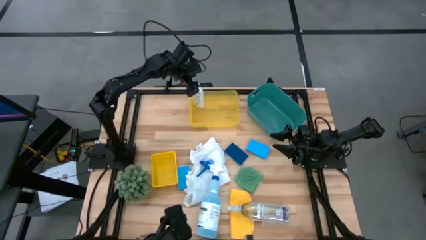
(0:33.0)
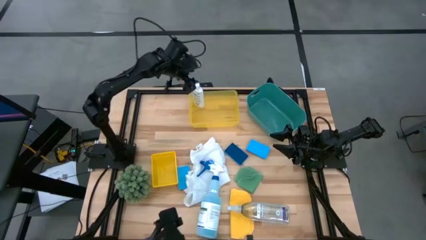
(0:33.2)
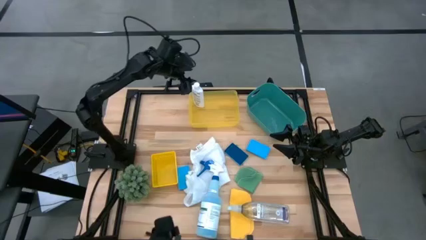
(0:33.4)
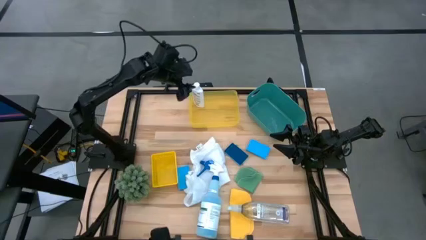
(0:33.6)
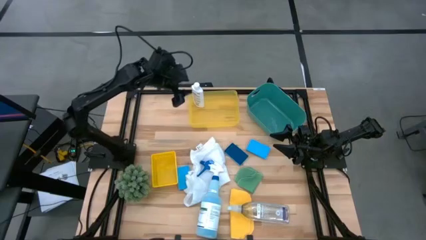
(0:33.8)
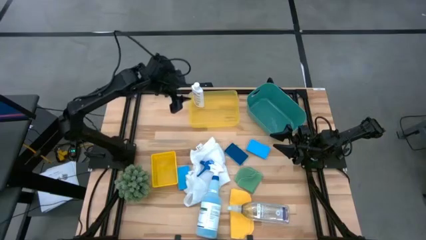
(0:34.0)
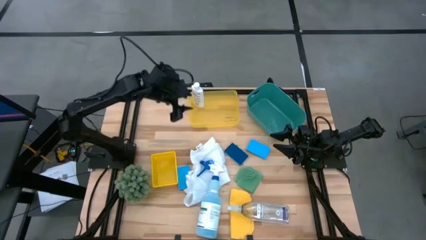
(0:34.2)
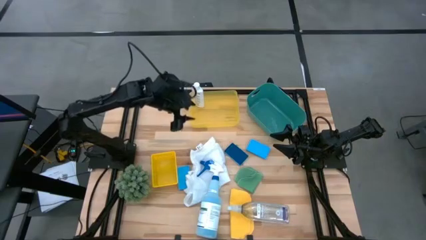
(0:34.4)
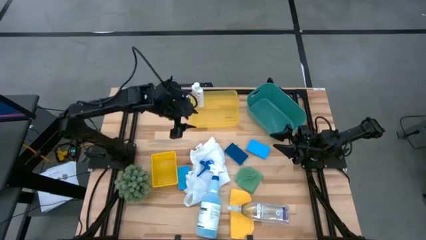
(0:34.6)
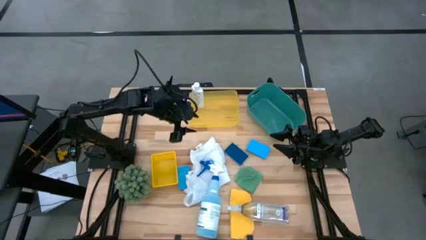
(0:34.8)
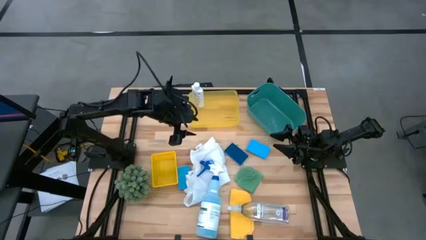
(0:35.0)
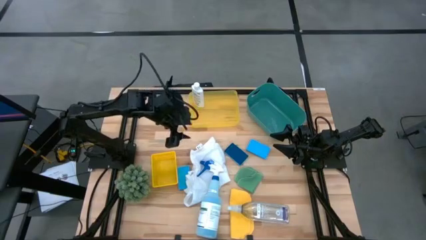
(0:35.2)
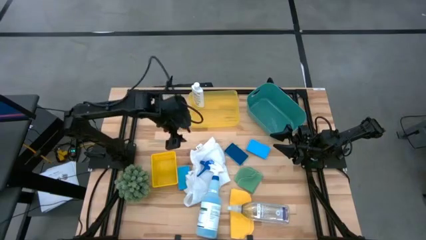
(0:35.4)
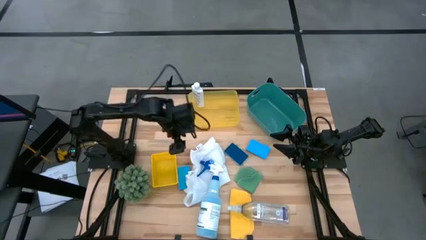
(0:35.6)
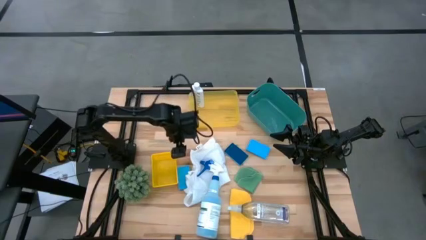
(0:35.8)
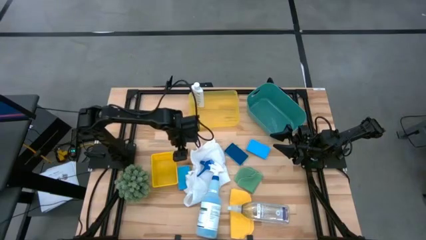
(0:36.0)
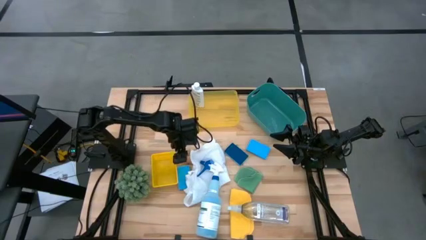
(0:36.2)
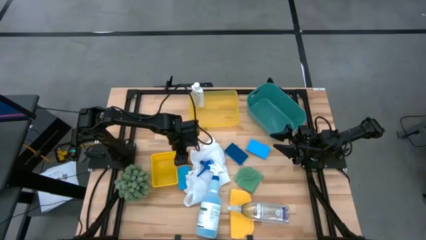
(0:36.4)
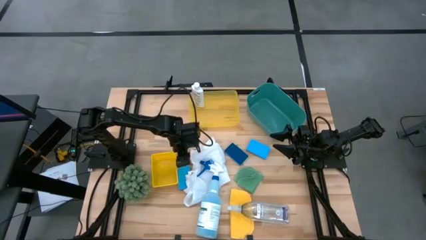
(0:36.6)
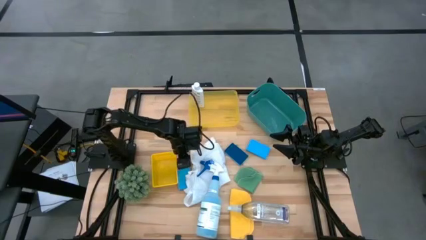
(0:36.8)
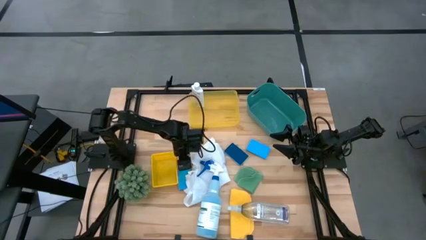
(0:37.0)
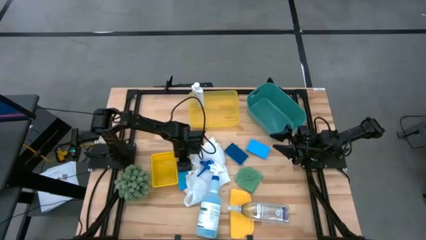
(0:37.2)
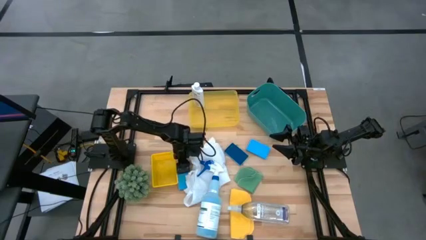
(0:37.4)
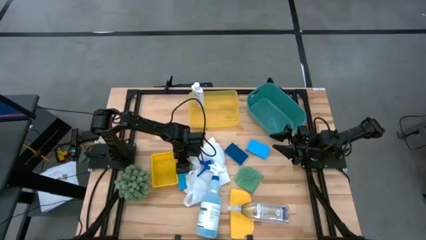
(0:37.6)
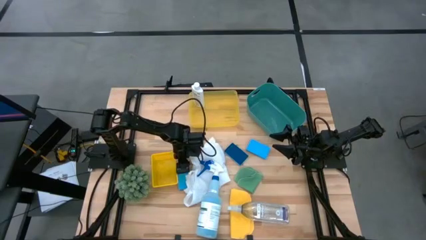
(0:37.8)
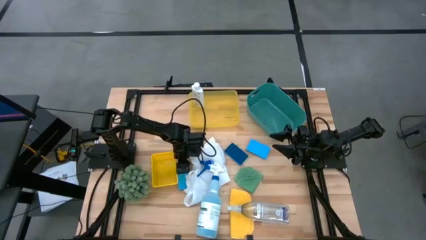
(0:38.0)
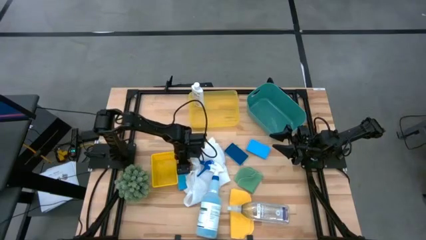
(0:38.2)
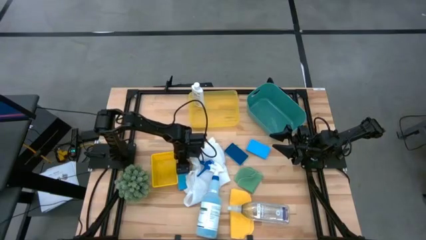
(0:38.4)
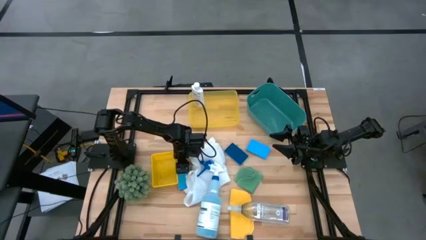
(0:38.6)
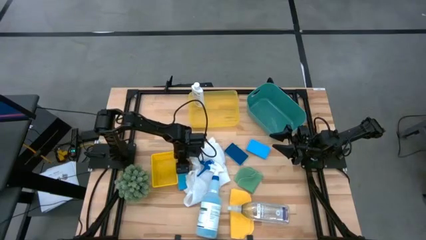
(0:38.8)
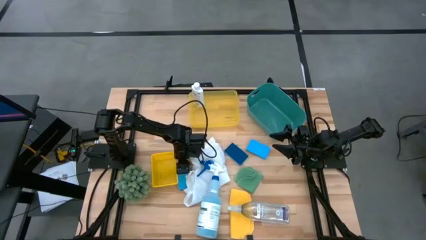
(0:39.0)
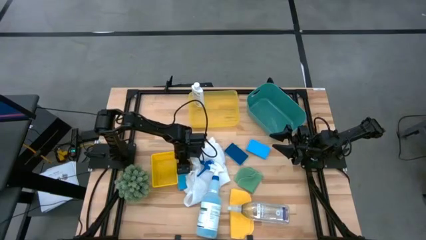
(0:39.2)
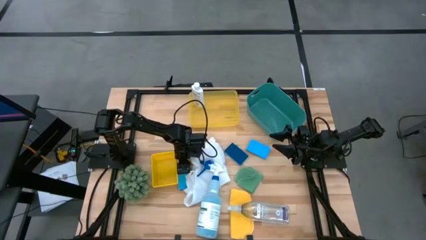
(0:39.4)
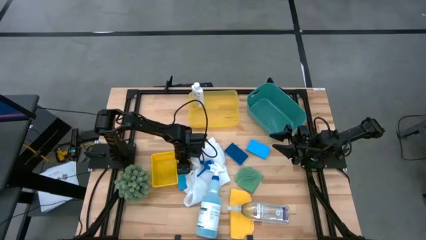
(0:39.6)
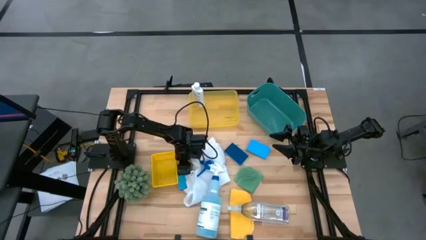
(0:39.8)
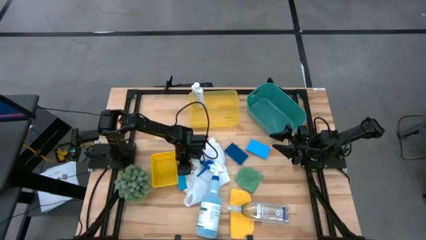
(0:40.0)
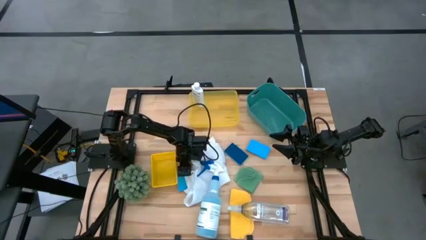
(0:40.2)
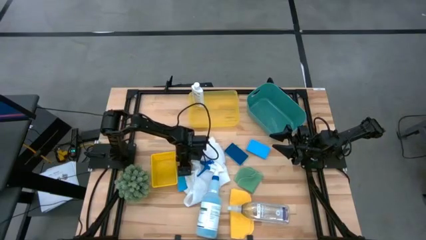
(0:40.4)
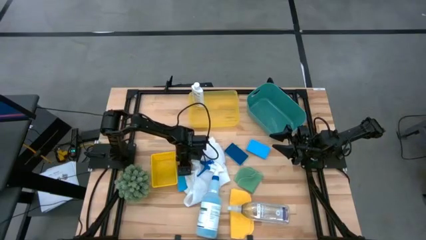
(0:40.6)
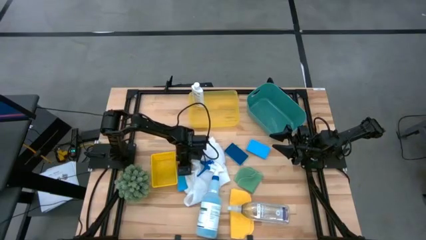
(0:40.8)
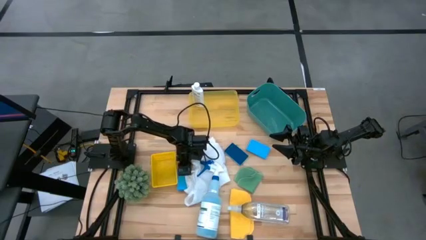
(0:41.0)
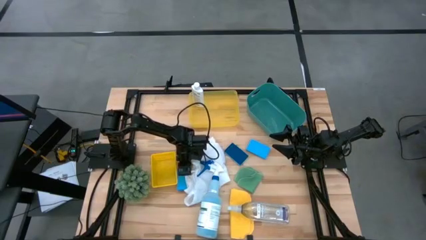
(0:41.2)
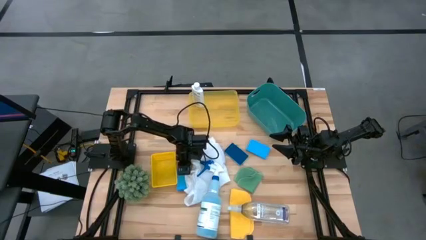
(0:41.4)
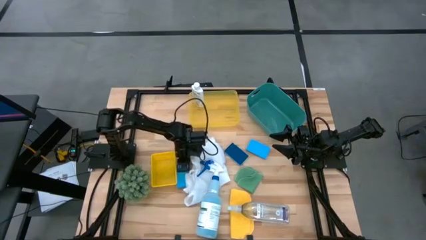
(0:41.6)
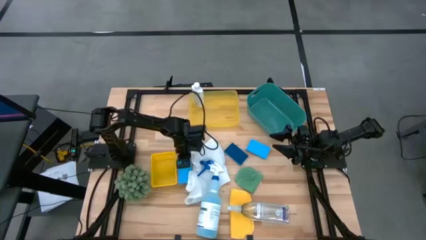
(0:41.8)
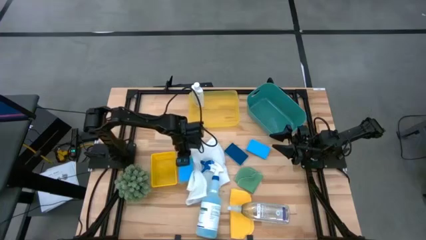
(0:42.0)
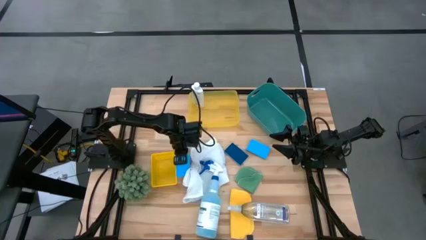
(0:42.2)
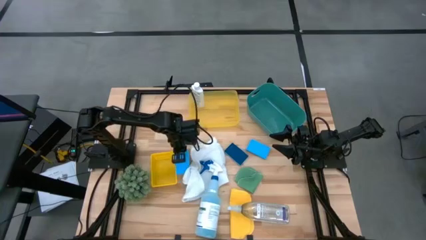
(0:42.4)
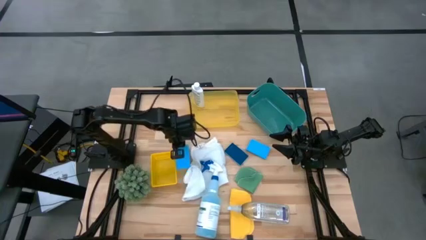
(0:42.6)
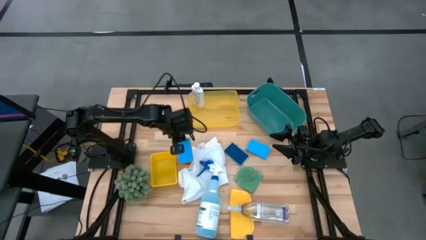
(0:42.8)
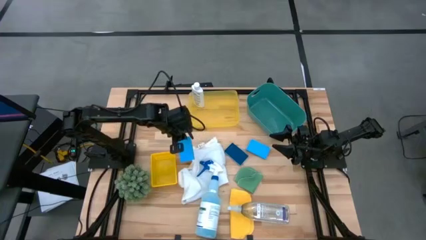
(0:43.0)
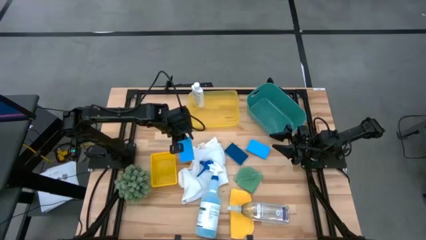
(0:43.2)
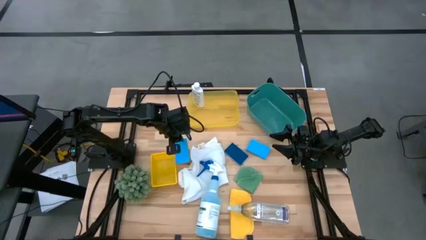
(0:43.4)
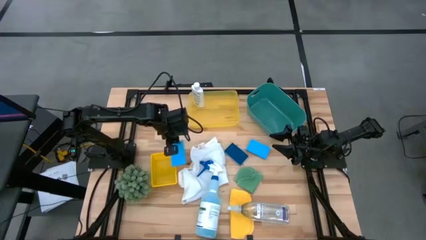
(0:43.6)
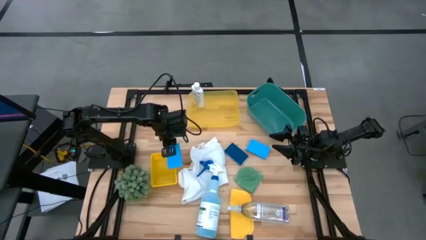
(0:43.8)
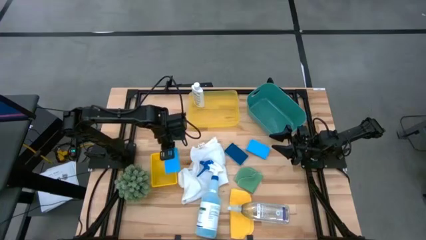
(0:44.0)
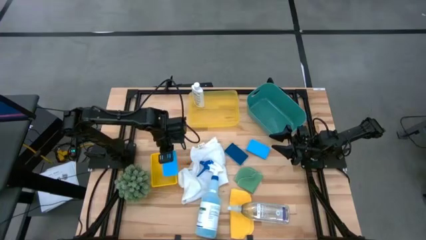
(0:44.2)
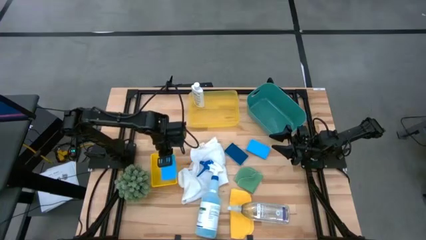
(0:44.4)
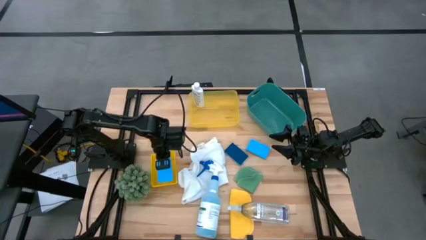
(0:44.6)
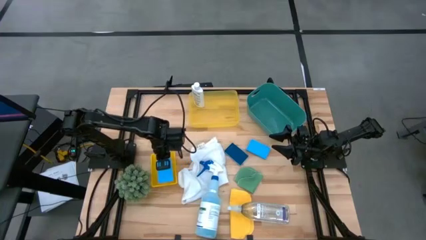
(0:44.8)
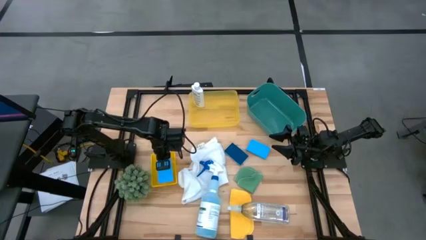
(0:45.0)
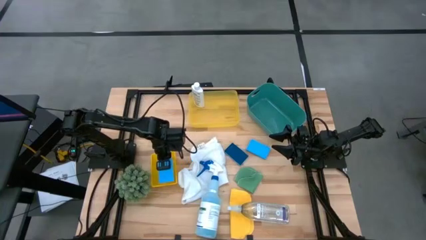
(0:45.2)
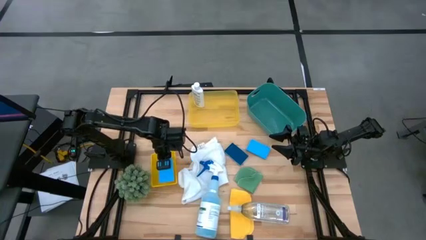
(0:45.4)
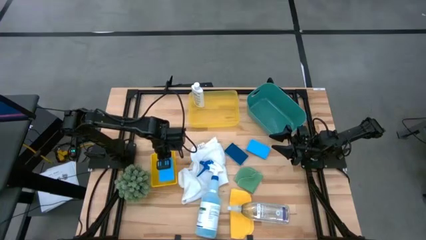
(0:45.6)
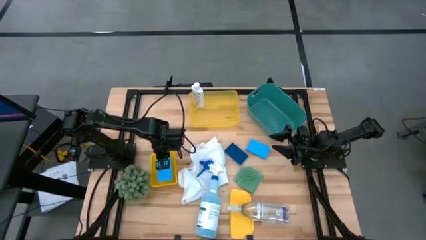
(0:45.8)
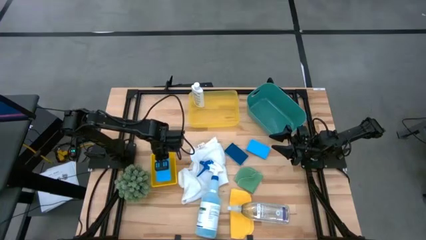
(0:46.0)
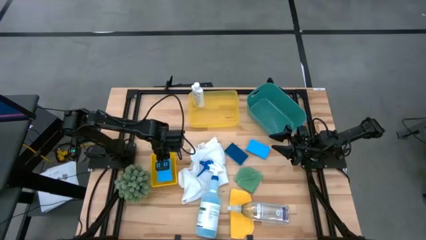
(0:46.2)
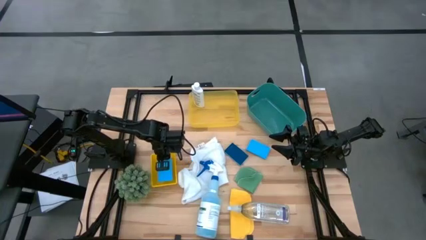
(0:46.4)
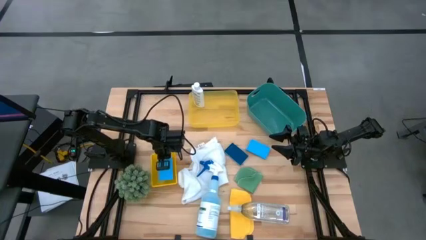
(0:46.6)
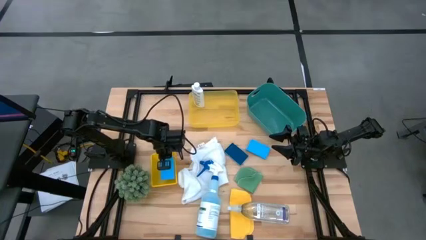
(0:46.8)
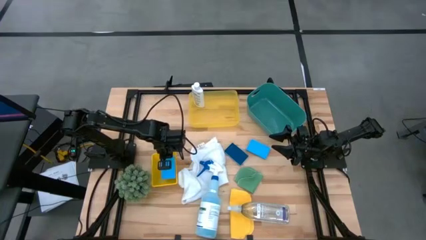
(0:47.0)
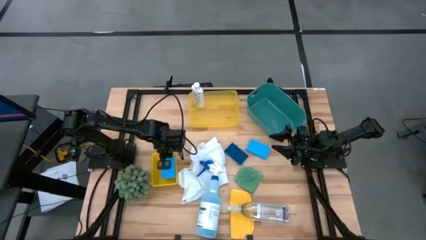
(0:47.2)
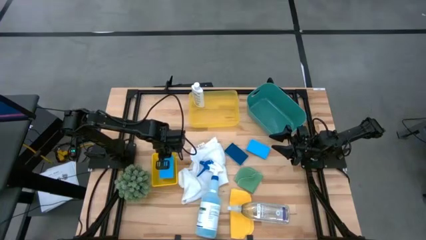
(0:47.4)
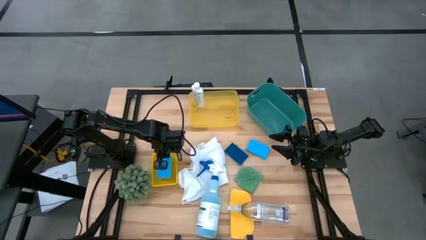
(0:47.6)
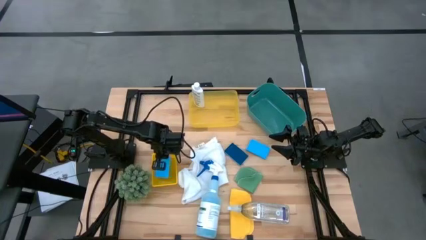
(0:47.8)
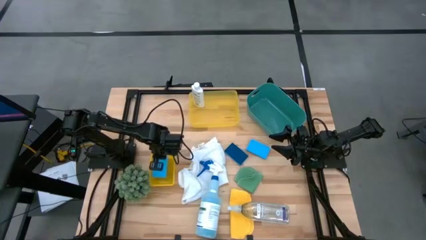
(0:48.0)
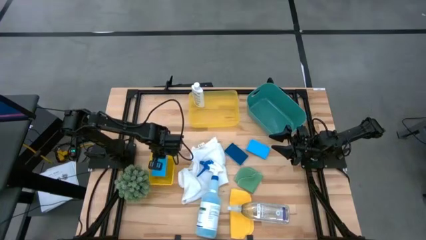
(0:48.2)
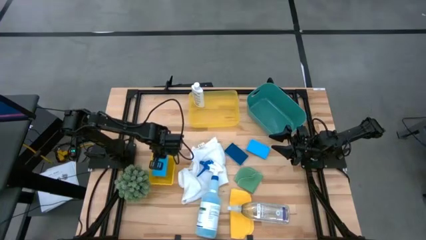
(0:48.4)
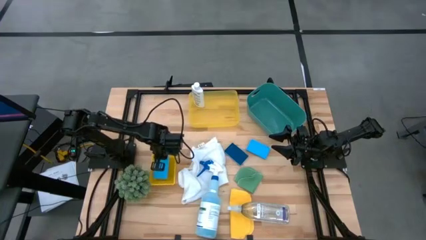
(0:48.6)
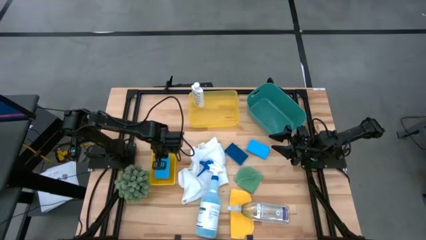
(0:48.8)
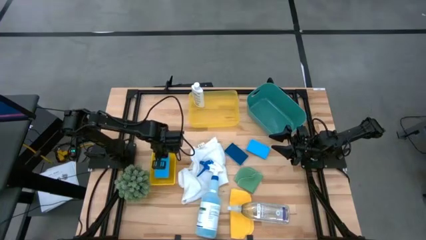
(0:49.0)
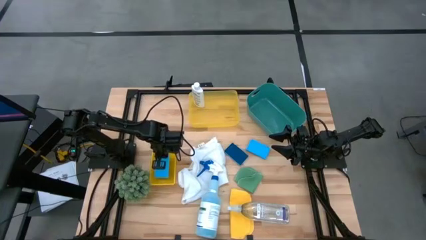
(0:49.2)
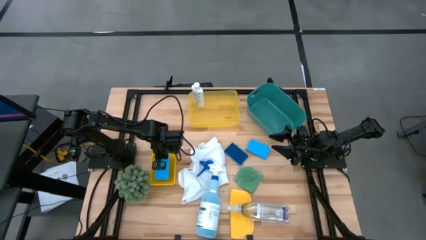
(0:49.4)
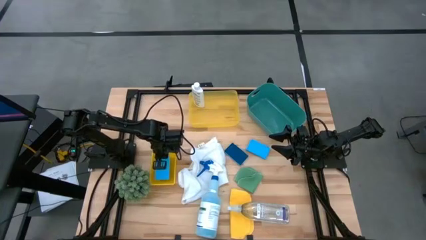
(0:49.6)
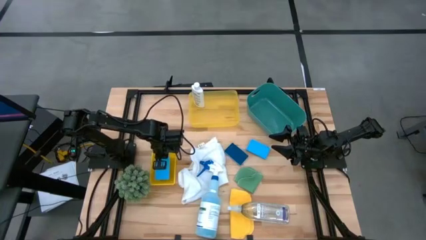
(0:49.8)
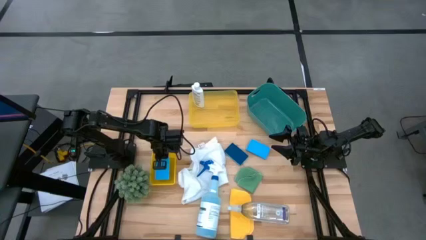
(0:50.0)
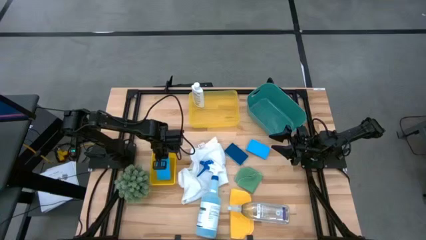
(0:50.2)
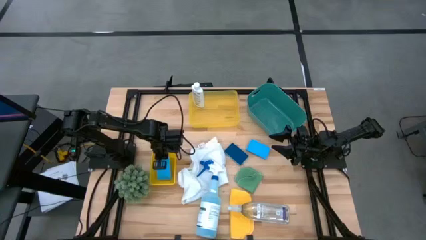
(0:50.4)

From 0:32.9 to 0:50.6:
Task: Pick & Place Kitchen Items
Put the blue sponge into the bottom yellow bin
